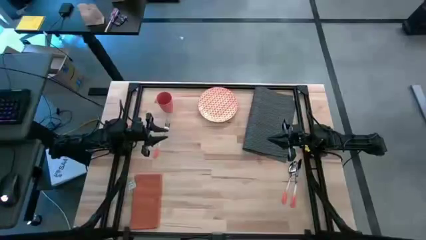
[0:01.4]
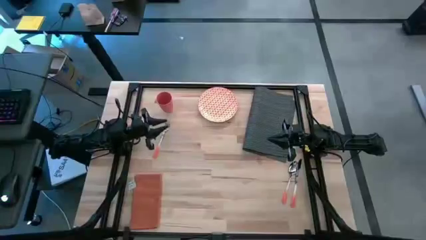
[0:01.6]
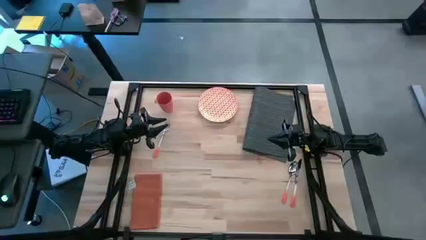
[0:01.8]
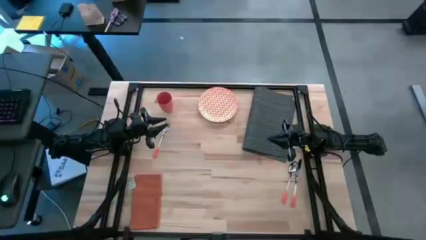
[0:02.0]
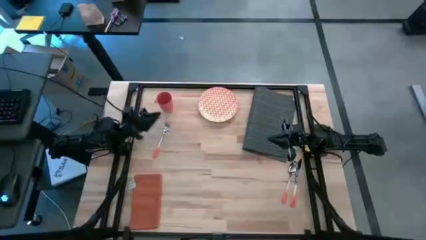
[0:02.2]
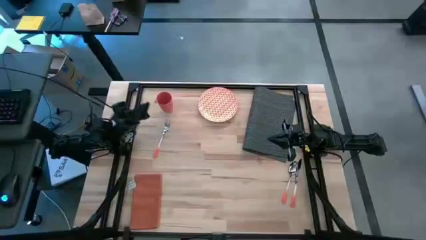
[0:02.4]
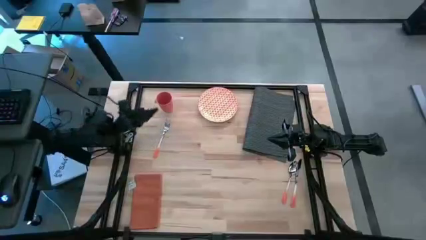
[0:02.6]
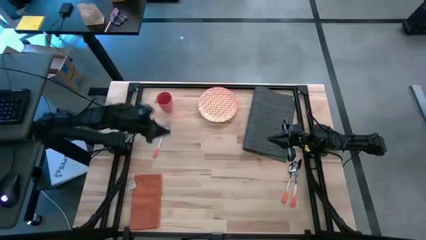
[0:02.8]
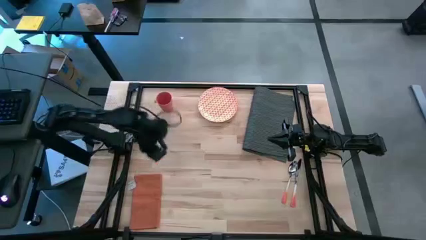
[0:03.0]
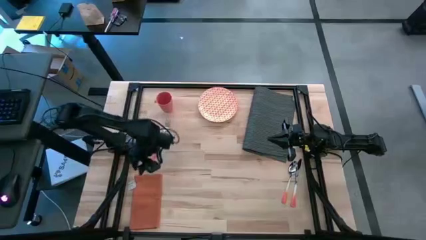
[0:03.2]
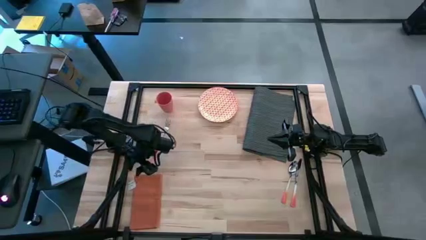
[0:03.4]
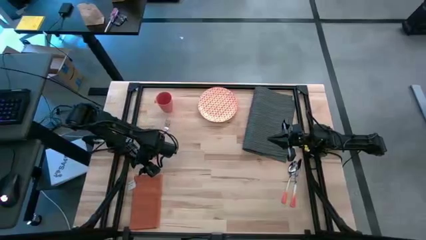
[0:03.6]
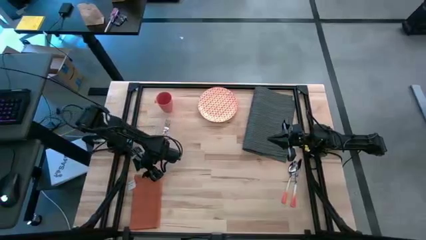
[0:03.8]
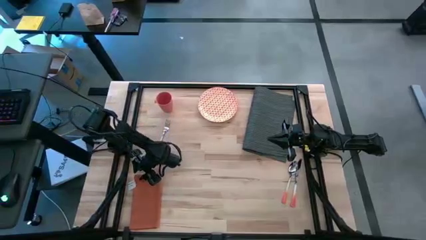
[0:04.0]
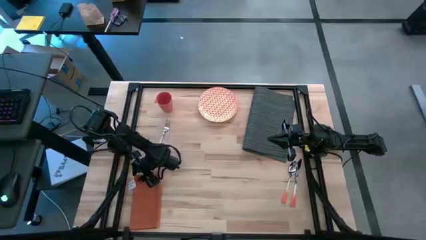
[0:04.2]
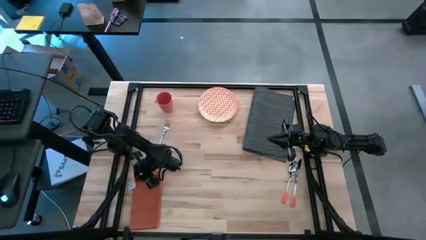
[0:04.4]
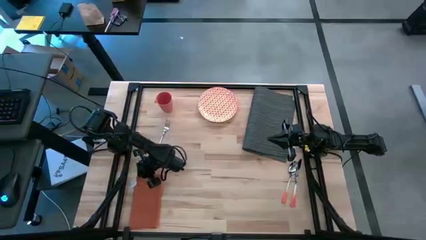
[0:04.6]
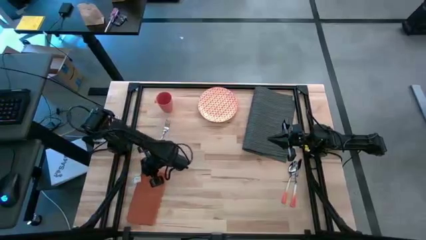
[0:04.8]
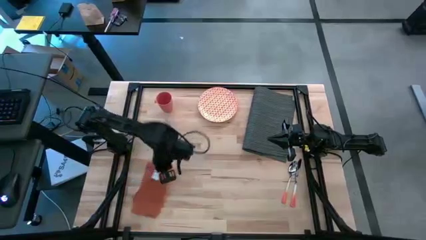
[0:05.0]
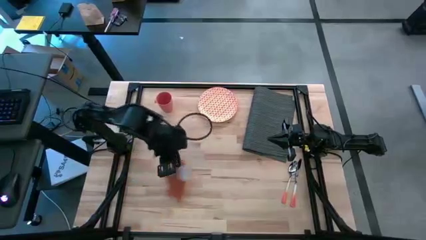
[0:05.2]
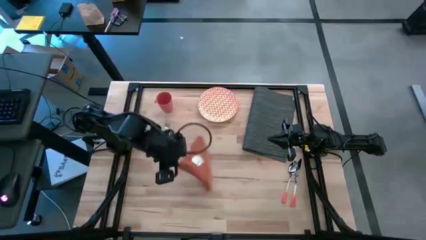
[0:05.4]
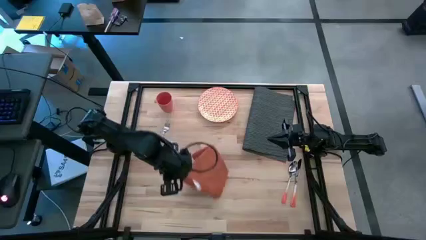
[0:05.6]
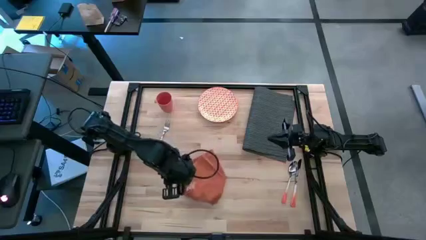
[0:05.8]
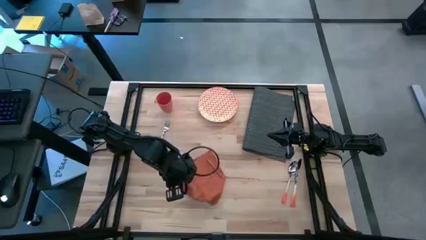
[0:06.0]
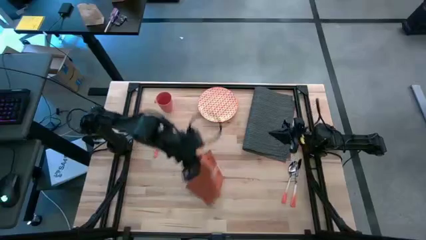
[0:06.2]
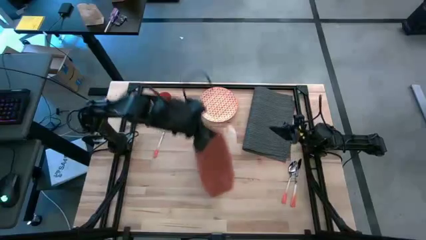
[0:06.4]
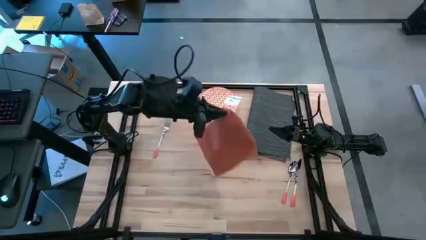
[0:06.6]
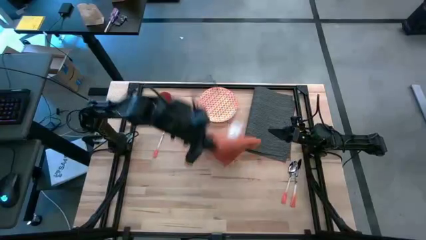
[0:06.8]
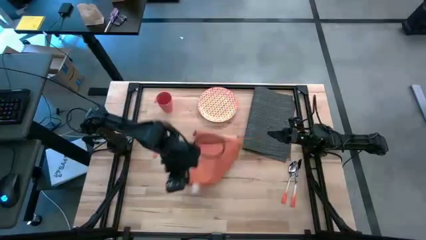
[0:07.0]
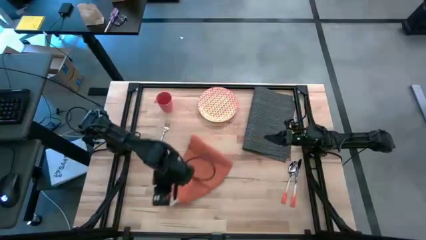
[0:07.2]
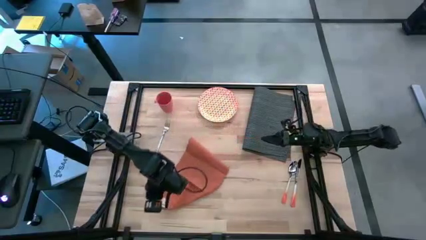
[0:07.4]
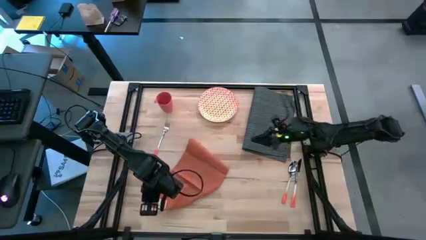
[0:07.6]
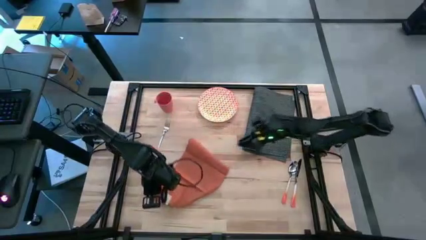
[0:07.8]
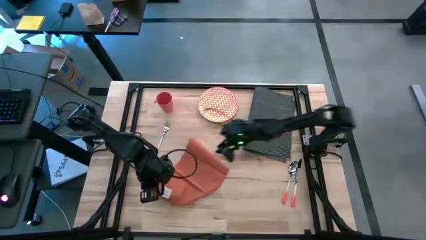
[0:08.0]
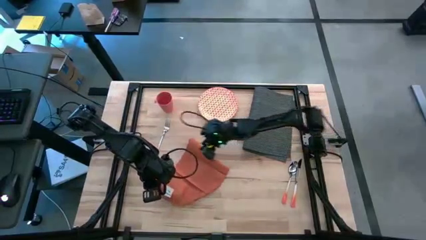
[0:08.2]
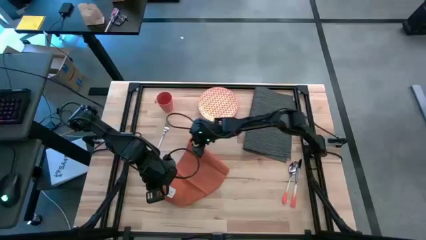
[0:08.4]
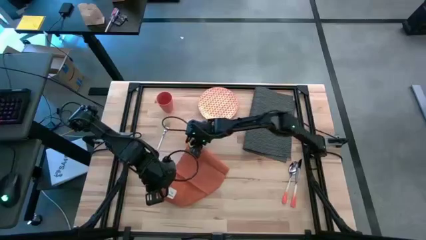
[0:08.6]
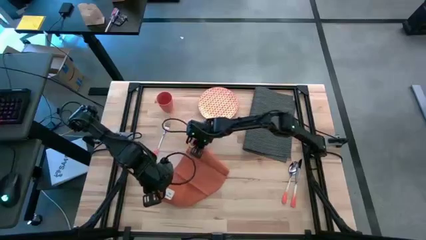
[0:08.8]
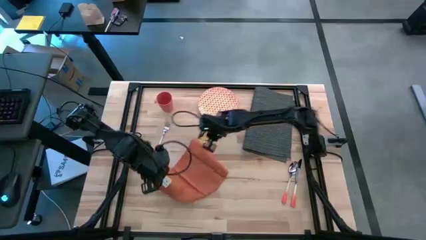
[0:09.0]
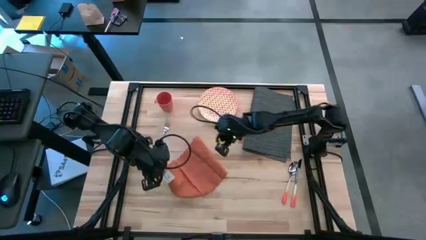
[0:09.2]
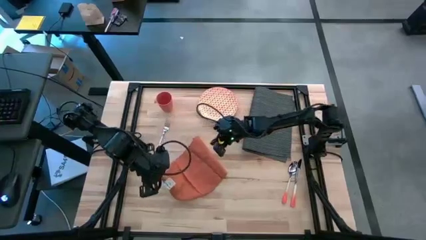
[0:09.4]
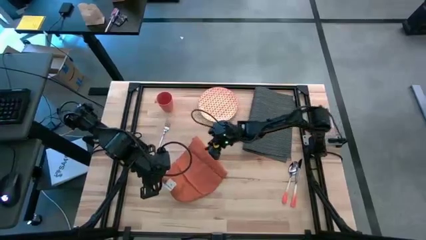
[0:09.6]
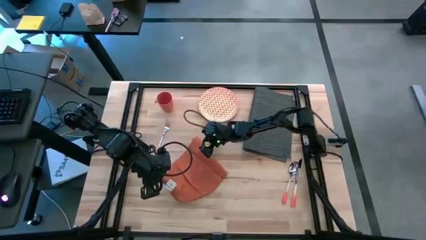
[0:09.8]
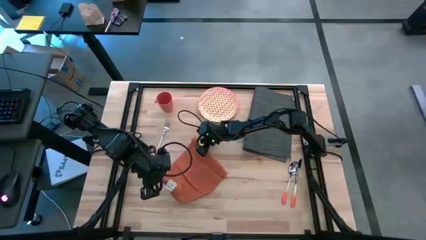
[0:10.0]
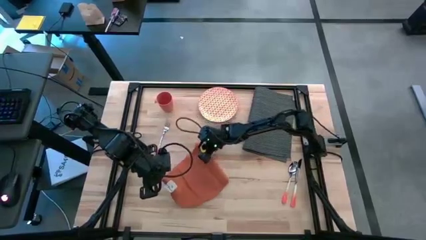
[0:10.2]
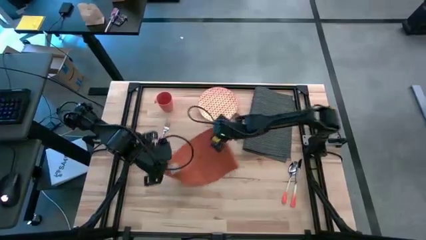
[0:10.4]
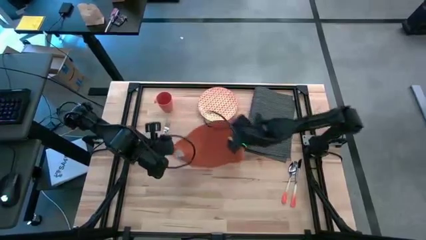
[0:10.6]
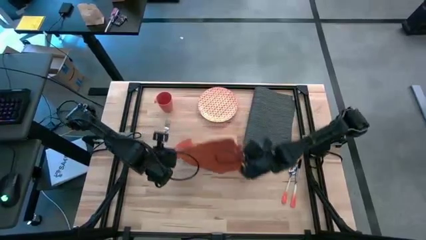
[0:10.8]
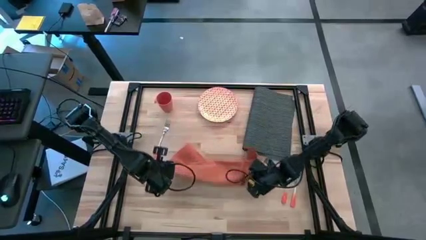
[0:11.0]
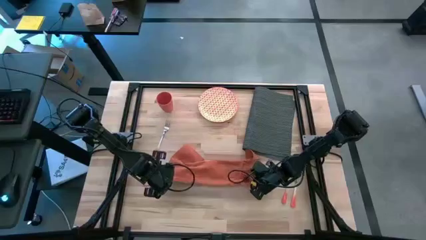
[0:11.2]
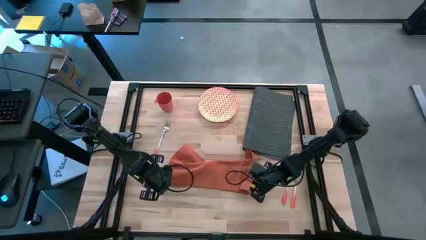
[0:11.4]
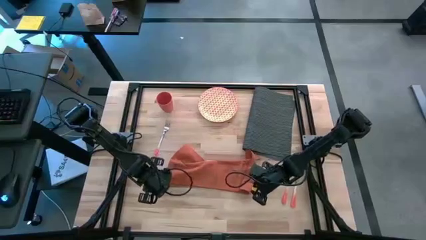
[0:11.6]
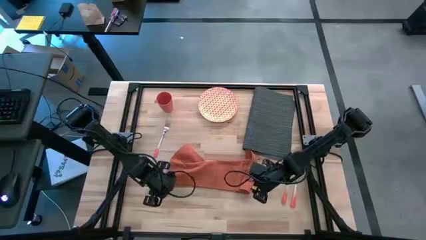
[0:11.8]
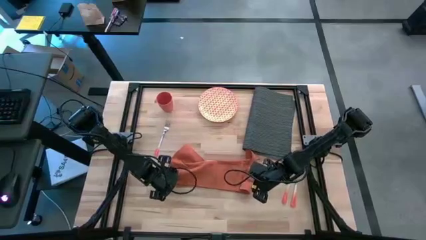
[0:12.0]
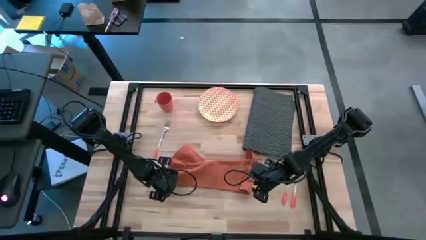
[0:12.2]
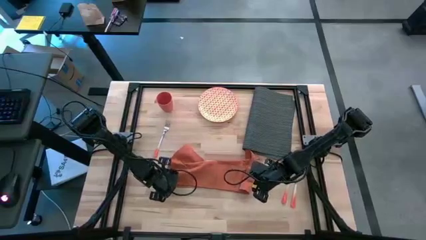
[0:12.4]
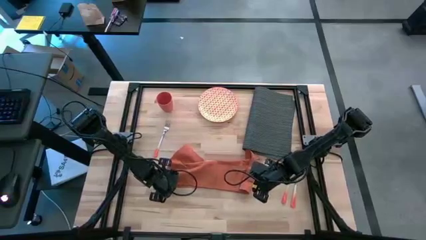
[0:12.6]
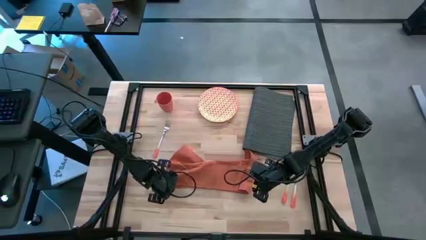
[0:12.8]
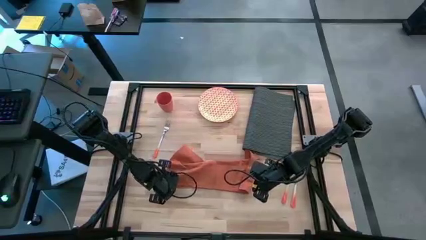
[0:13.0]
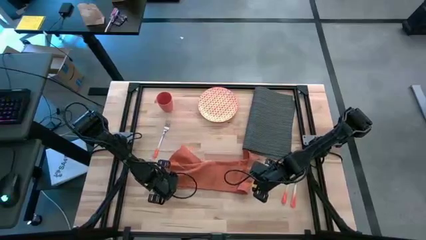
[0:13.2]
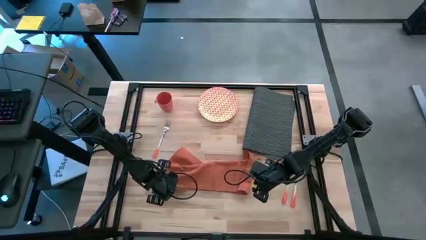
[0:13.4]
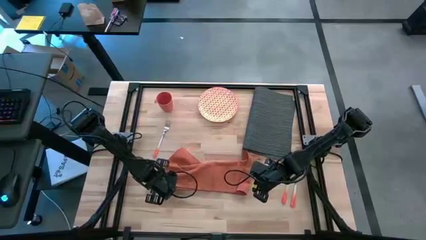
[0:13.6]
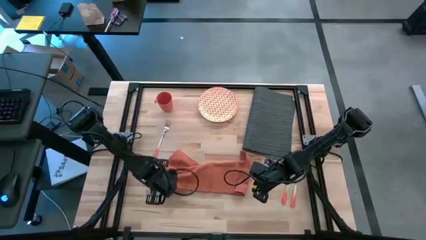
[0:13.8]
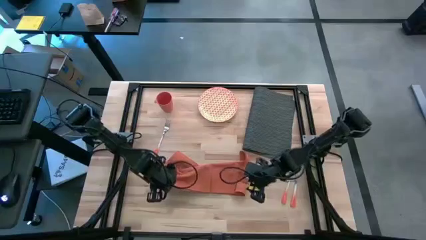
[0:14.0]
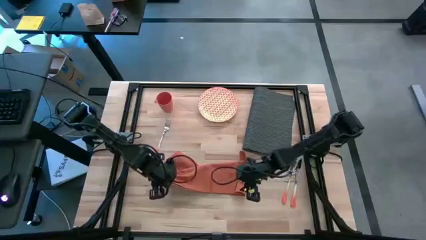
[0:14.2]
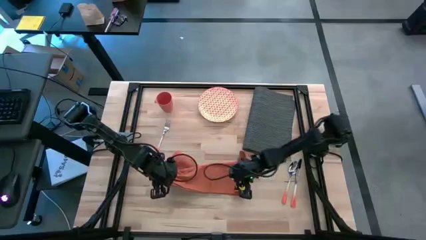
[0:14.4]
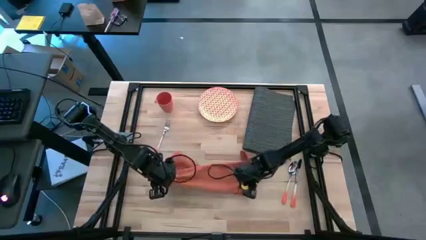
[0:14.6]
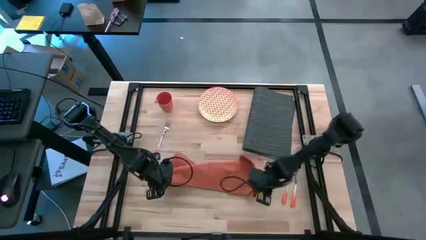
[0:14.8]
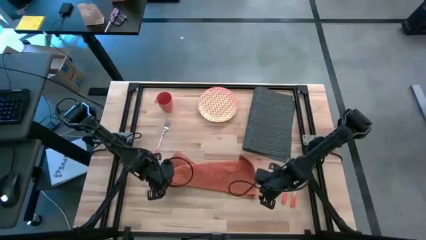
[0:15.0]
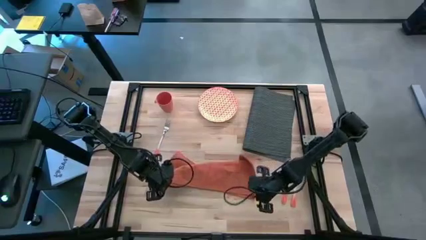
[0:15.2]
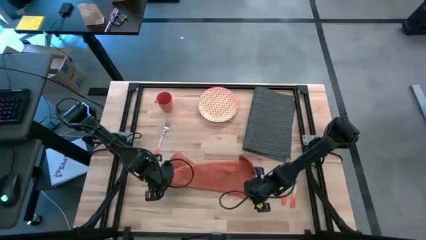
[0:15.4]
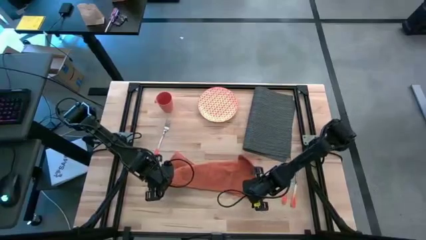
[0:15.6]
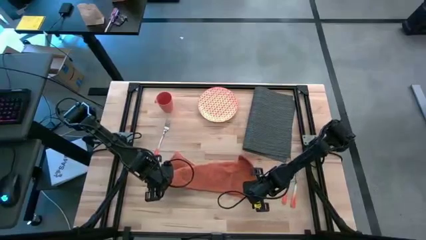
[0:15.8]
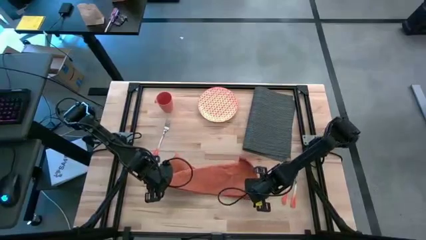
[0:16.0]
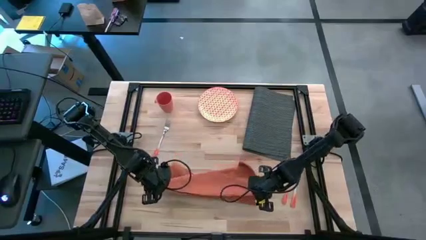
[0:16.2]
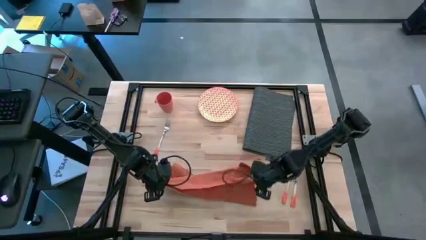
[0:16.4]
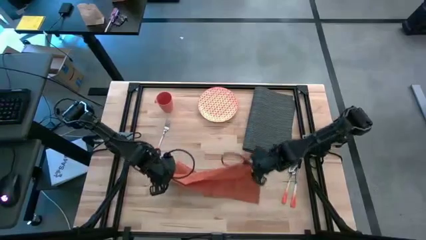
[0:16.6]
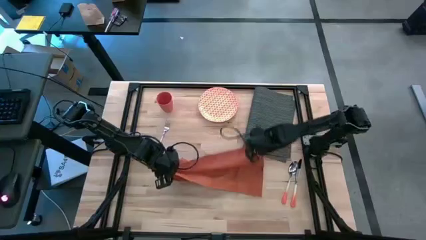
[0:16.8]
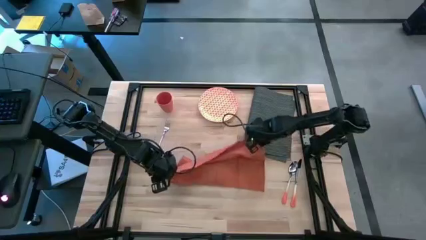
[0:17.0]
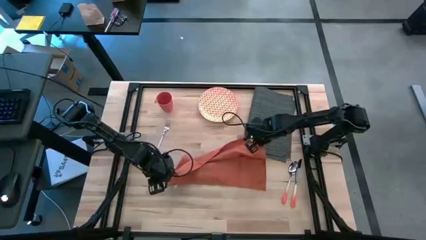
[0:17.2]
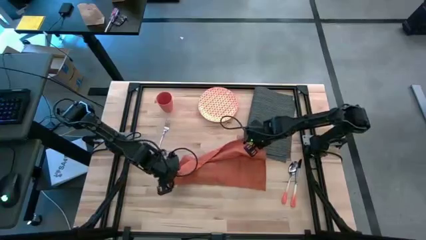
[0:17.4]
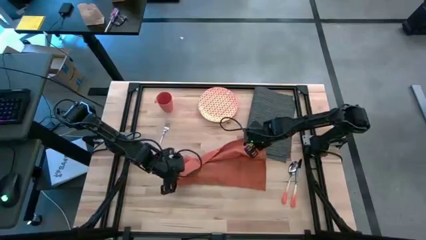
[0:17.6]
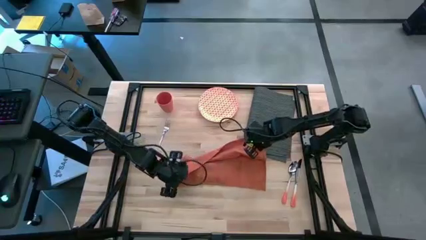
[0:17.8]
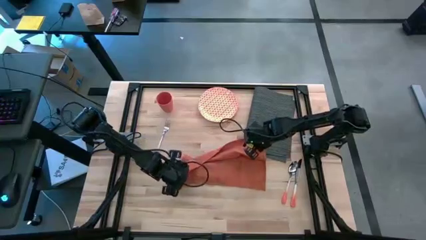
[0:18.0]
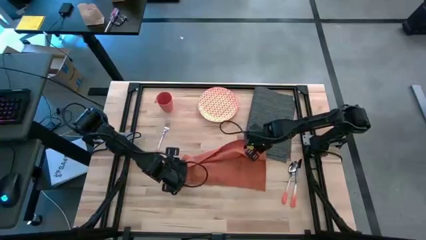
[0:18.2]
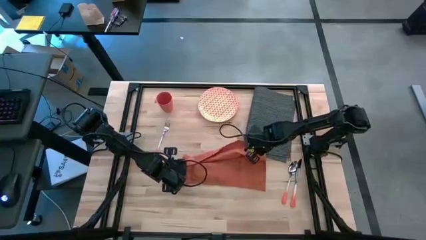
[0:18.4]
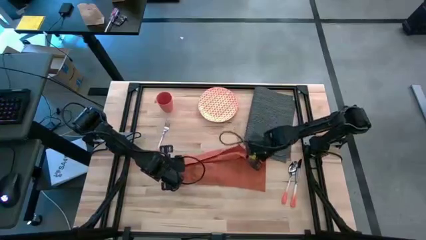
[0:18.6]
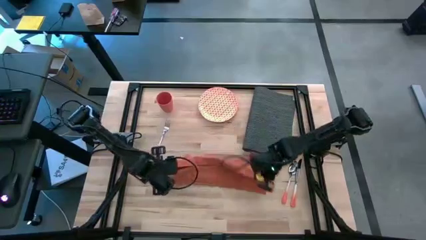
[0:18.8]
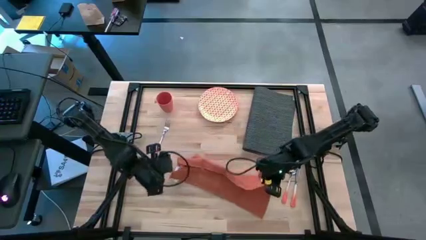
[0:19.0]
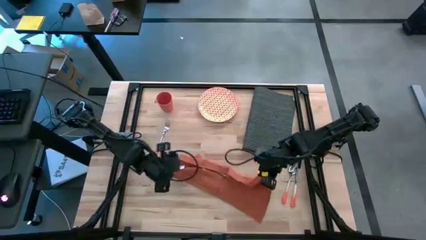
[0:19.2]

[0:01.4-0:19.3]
Task: Set table place
Fold the orange table napkin
